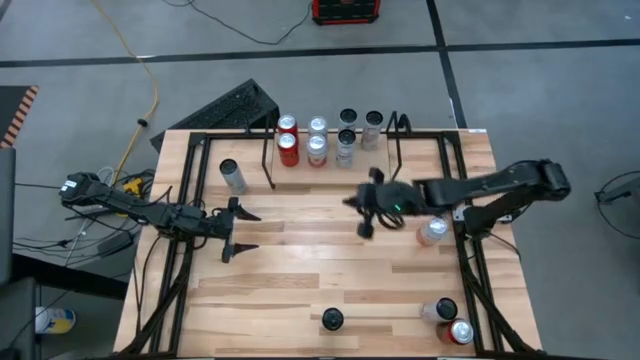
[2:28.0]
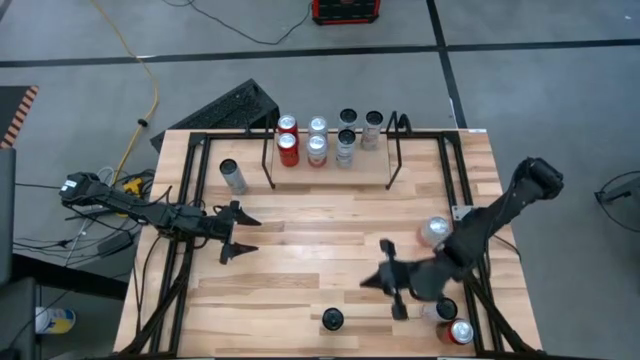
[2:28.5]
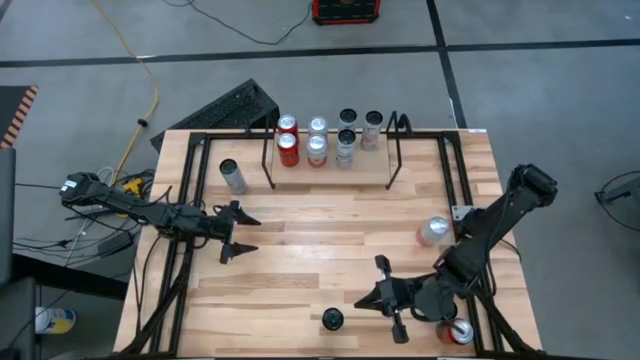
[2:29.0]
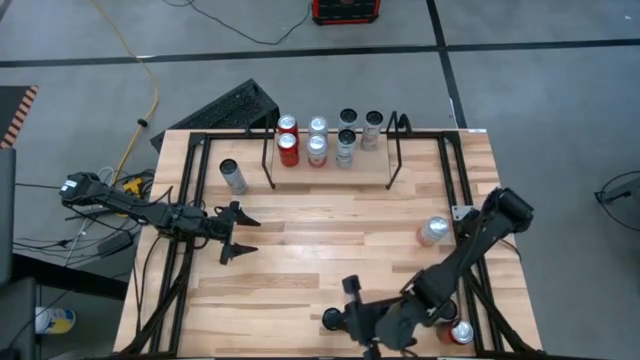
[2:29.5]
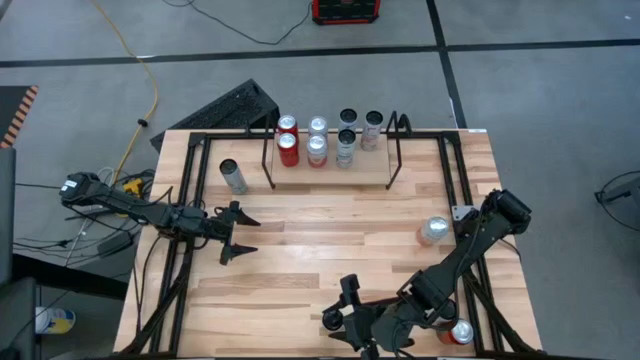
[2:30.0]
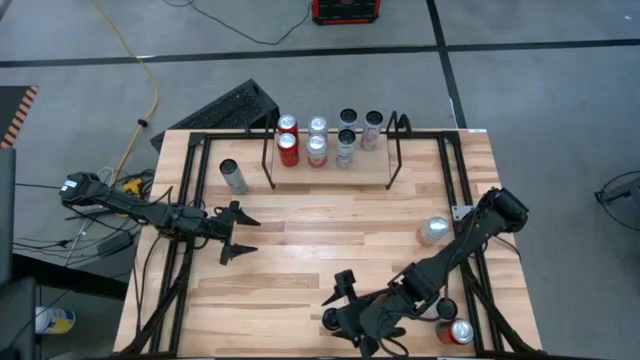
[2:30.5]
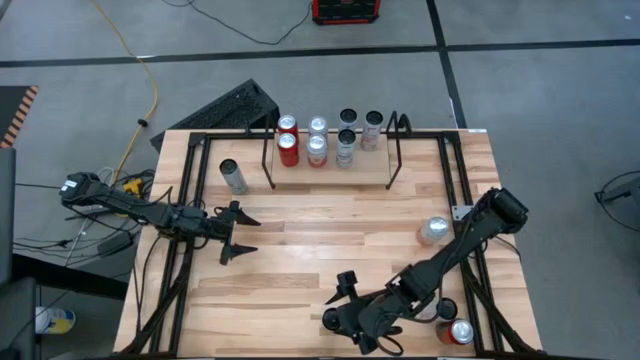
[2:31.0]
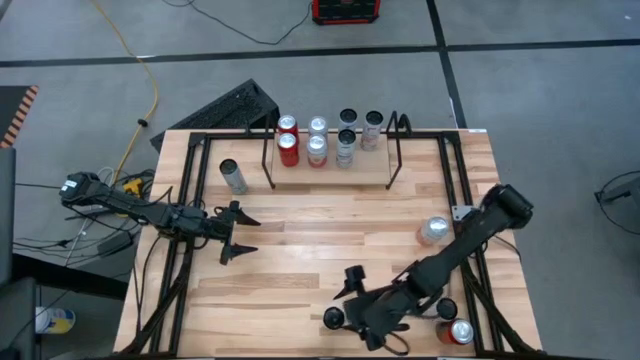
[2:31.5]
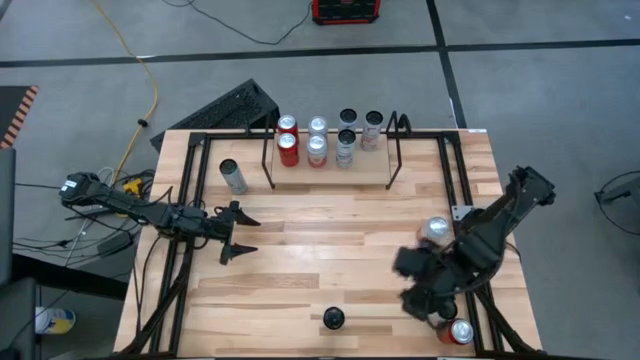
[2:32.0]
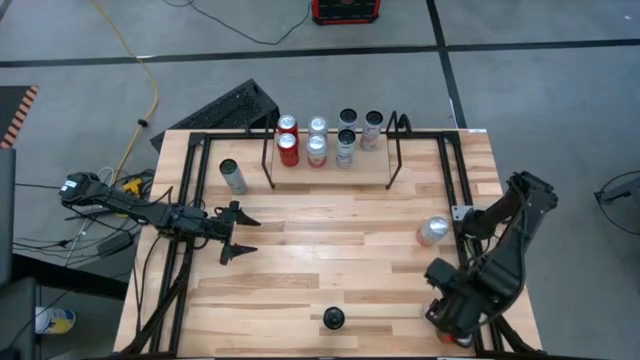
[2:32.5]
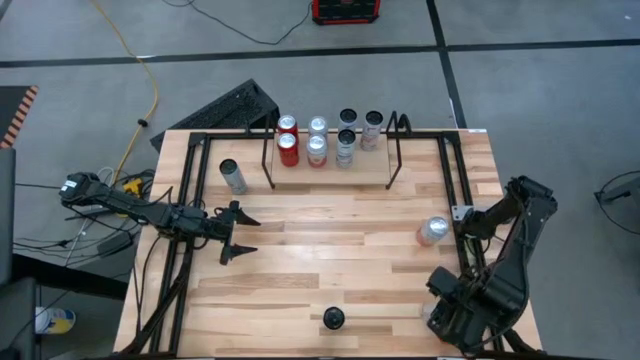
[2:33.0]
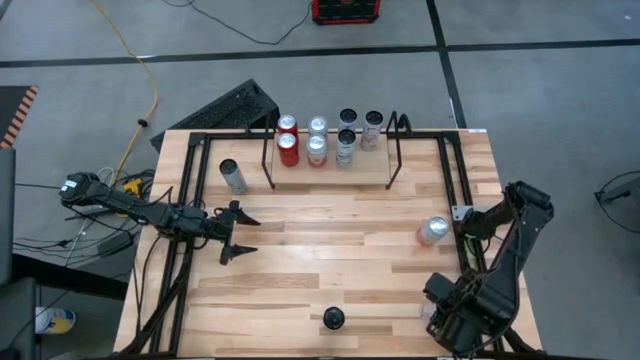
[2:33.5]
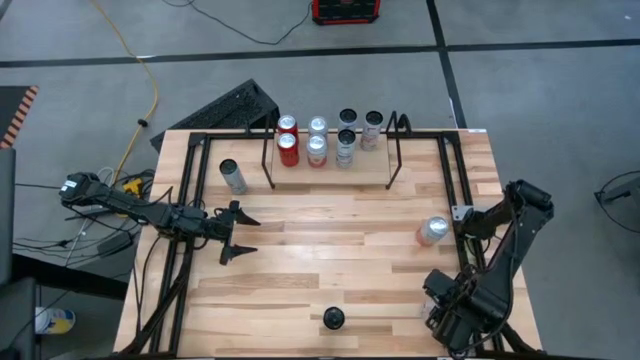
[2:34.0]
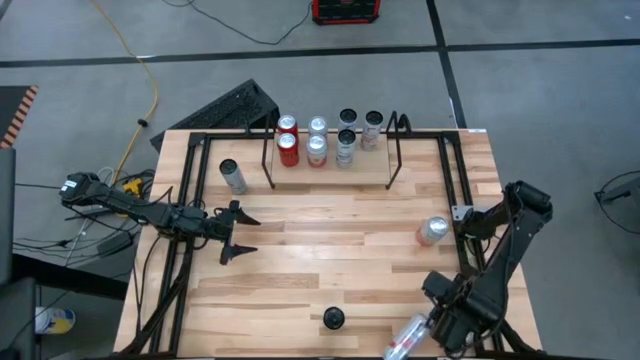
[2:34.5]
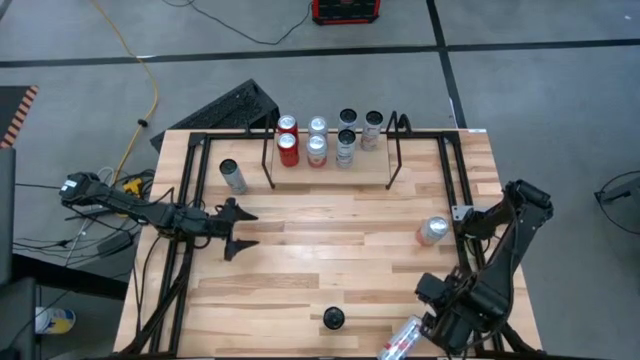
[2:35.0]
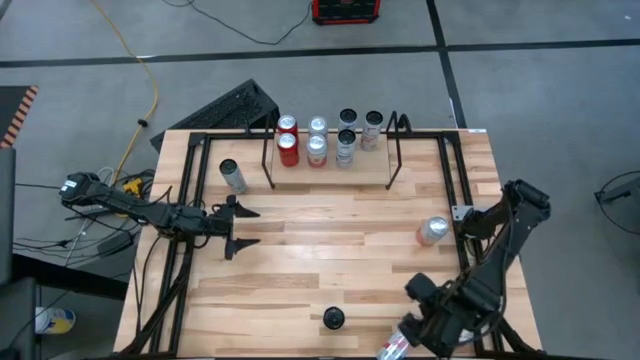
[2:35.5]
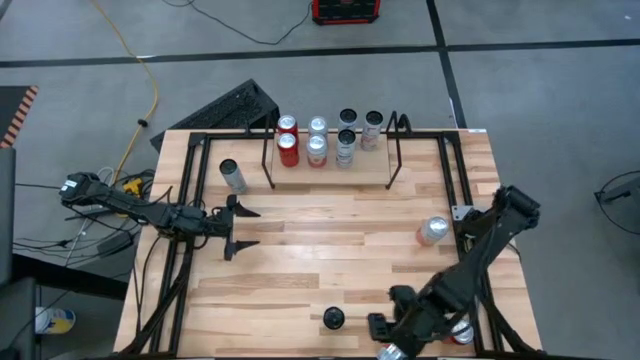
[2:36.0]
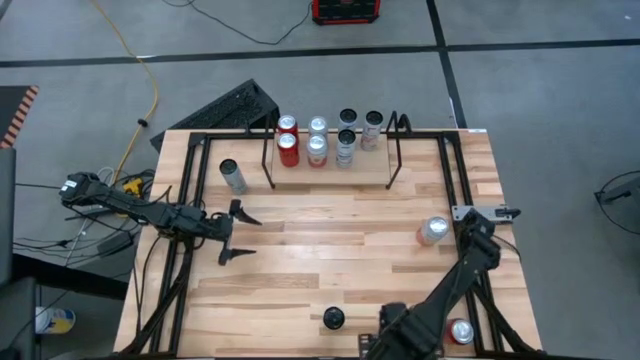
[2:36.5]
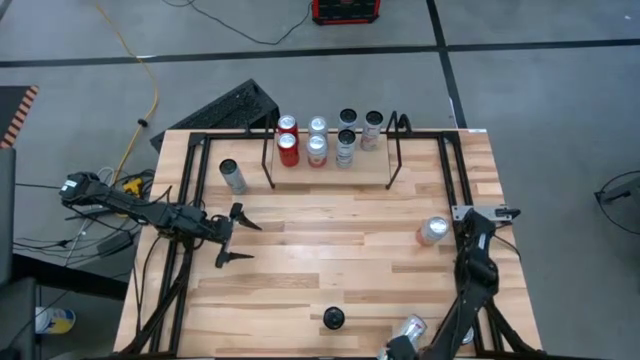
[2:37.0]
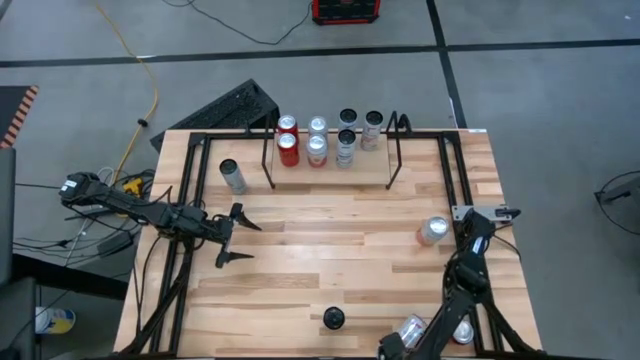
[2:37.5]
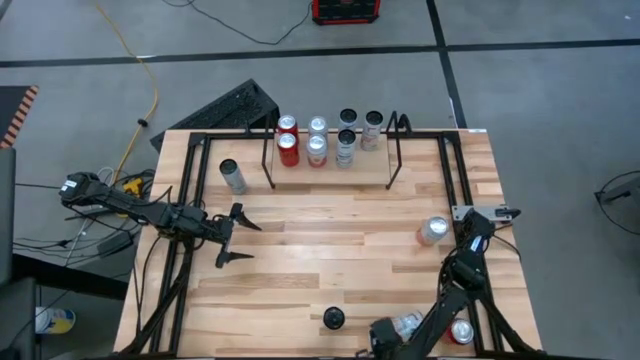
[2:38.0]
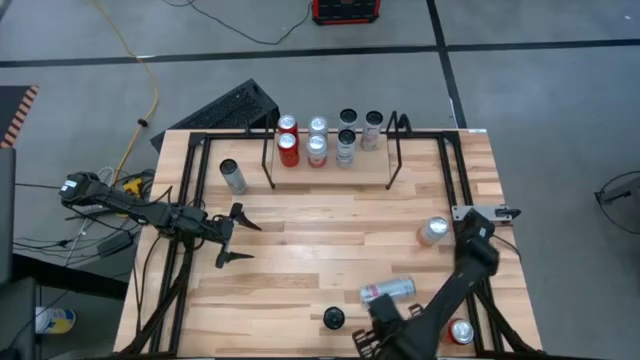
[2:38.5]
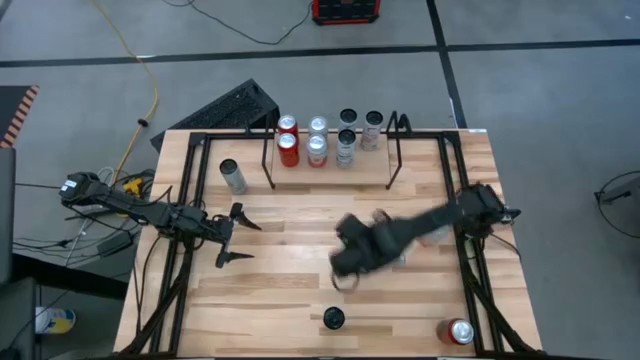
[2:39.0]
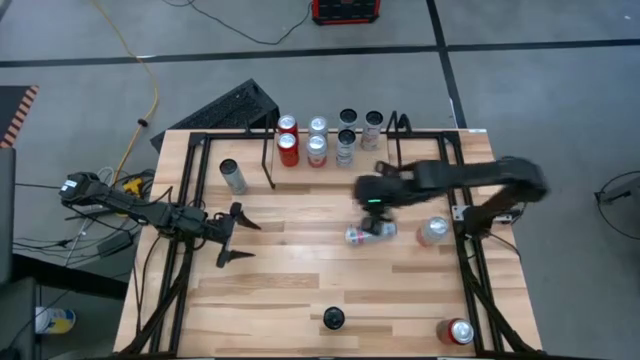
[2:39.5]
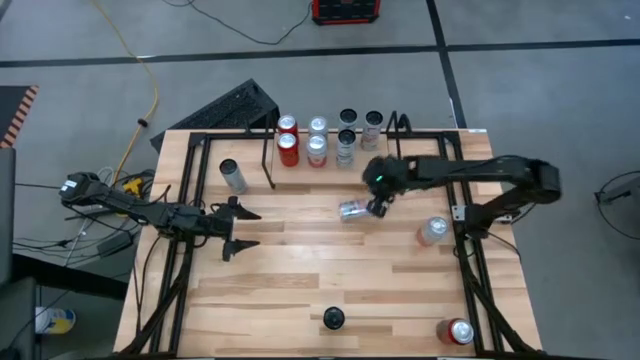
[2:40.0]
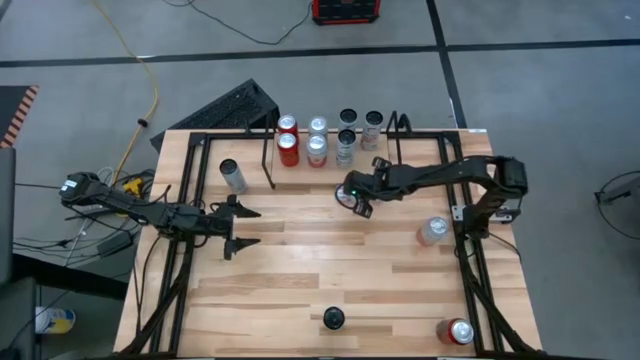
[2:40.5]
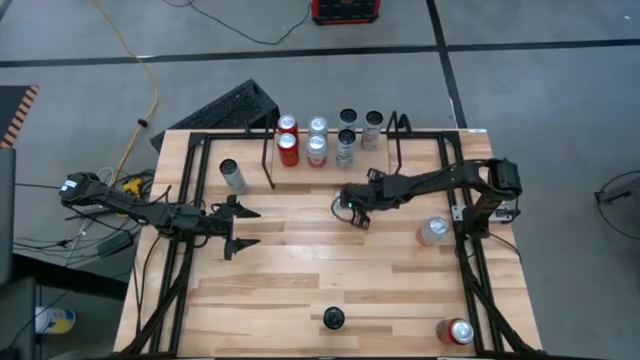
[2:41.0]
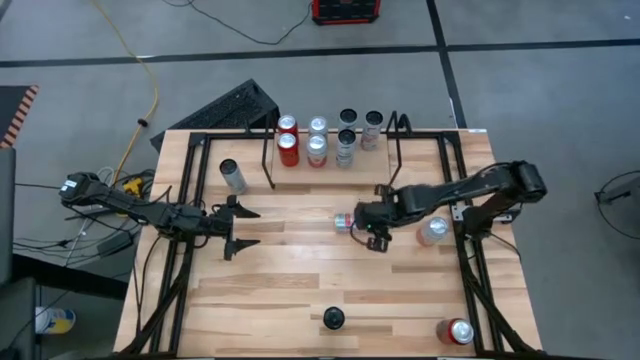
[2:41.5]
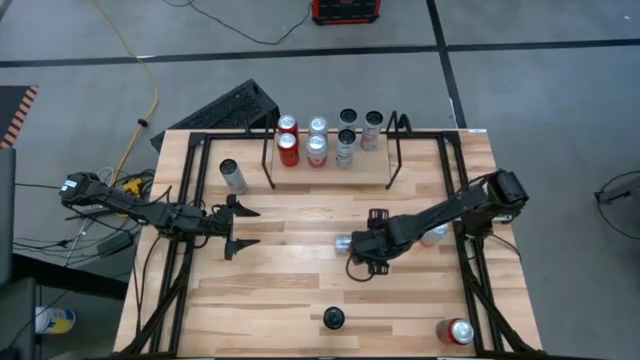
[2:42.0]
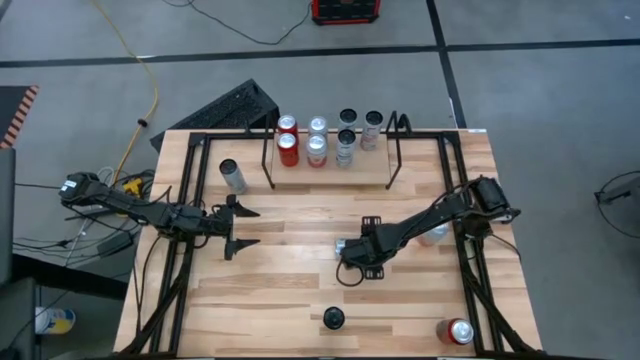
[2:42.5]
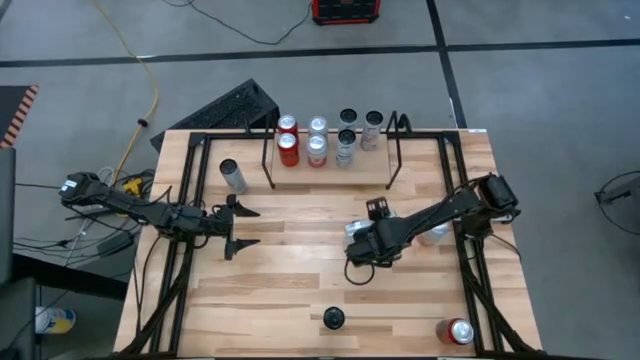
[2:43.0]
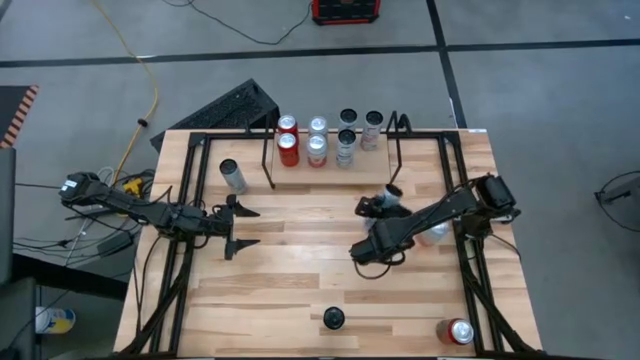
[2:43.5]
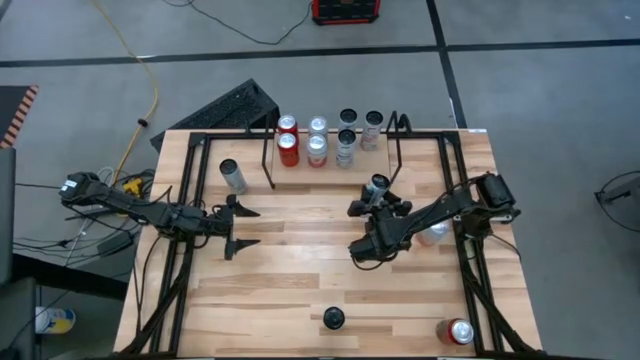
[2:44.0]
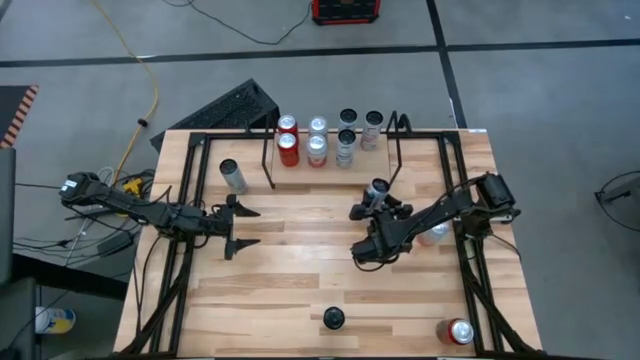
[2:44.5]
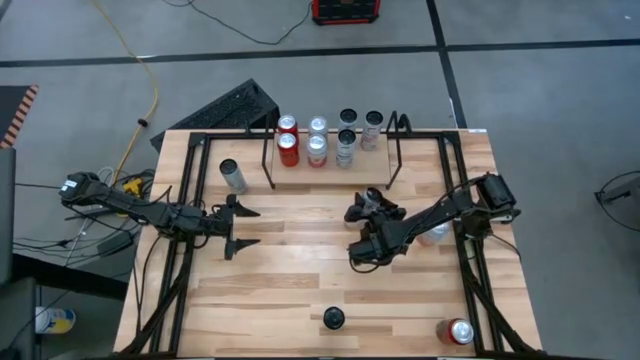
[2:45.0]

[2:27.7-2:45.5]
Task: Place canned beverage on shelf
Put the right white pink soda can on the shelf and align with other white pink soda can

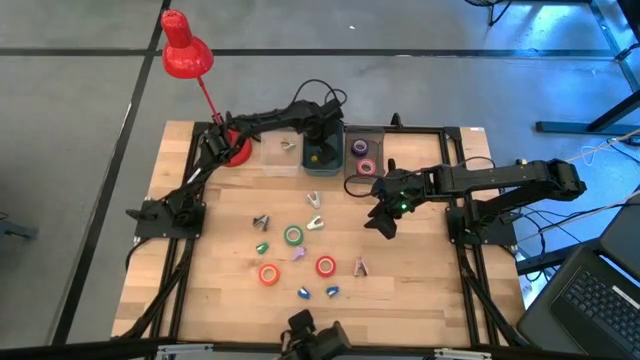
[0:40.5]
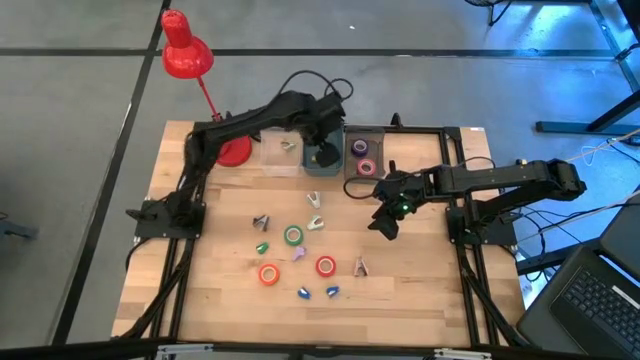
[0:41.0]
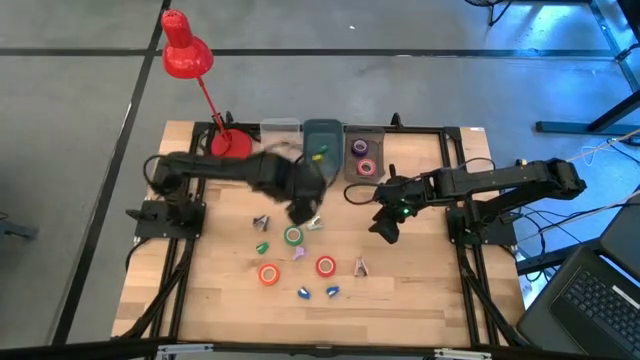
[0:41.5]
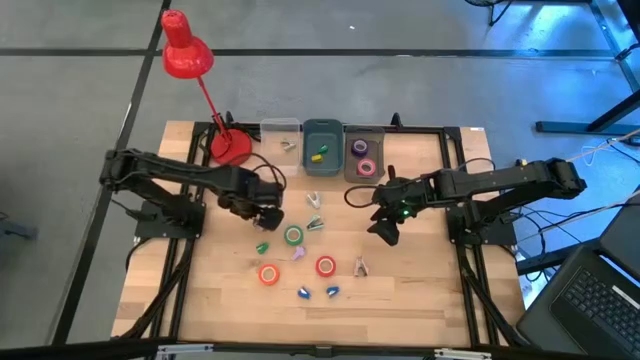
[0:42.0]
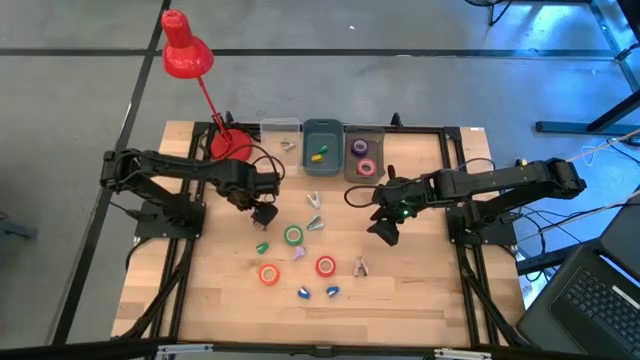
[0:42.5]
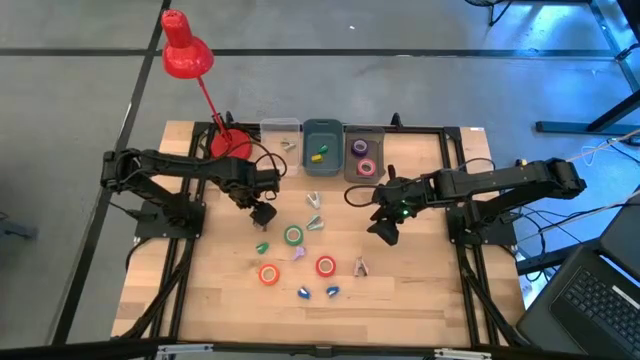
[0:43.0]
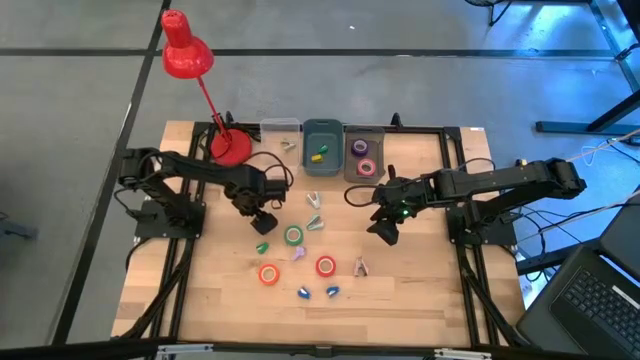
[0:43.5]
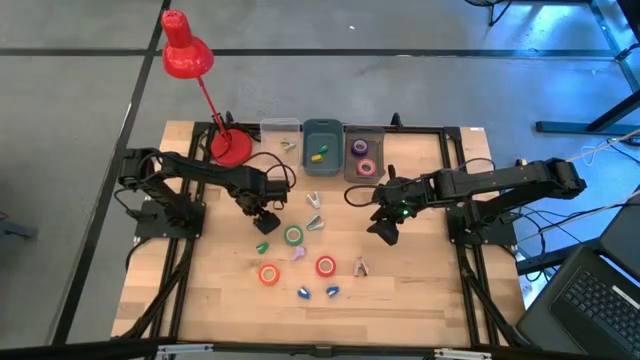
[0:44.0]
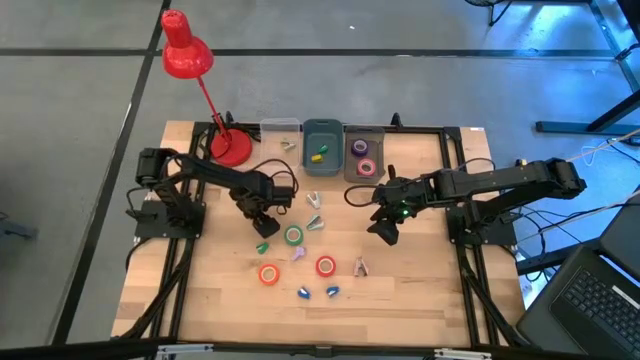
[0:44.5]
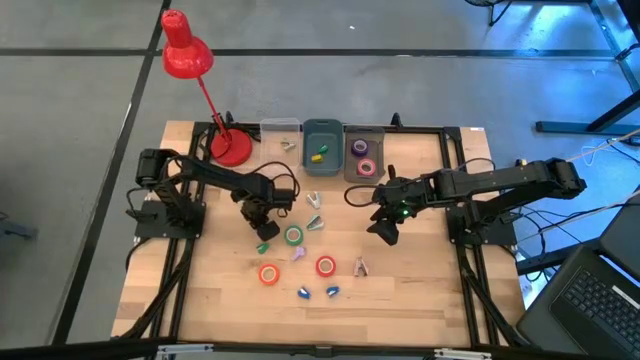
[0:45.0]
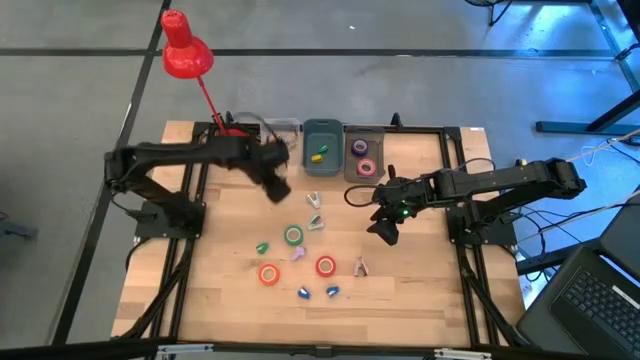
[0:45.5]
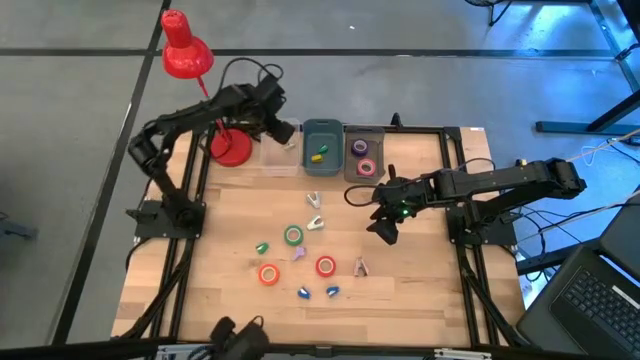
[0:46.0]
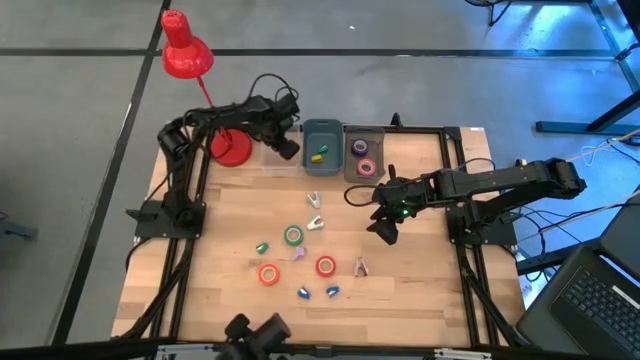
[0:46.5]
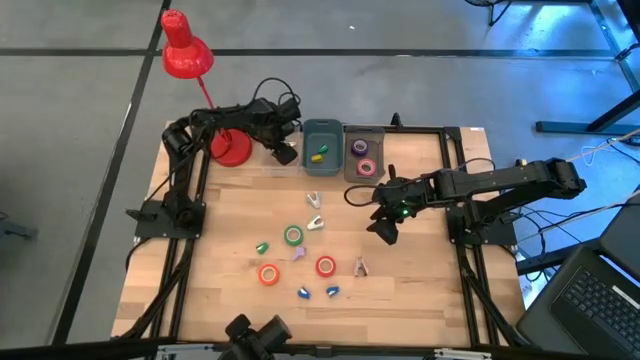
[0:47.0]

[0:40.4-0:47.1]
Task: Pick and place Stapler, Stapler remover, tape
Put the black staple remover into the transparent bin
